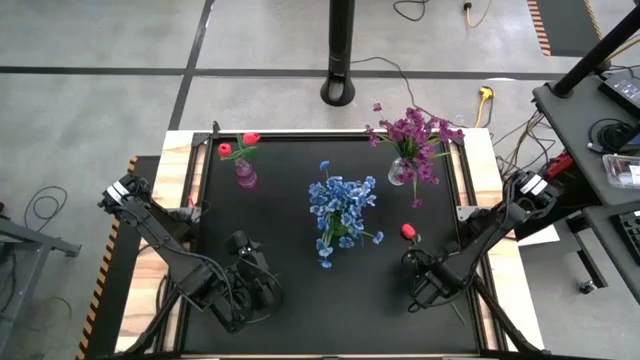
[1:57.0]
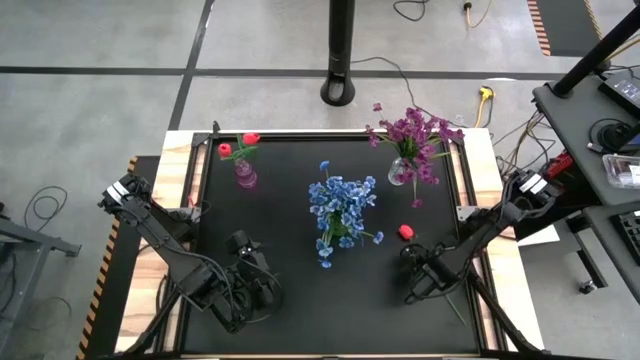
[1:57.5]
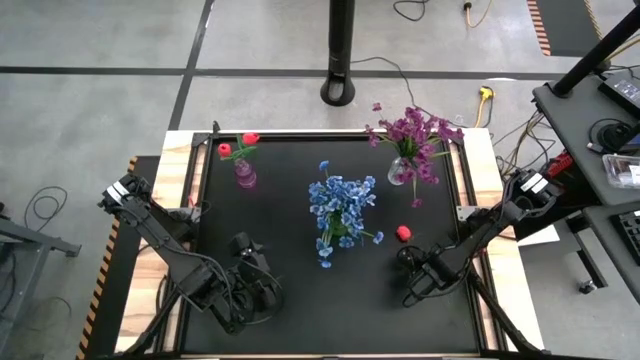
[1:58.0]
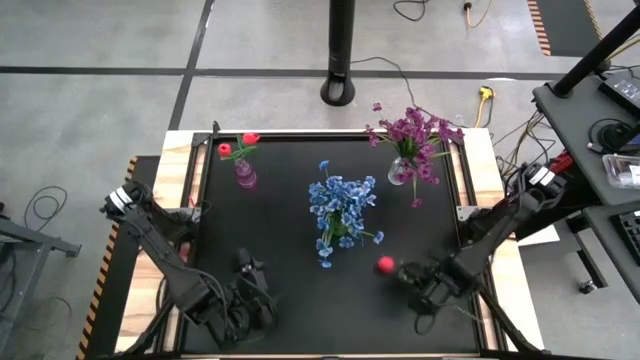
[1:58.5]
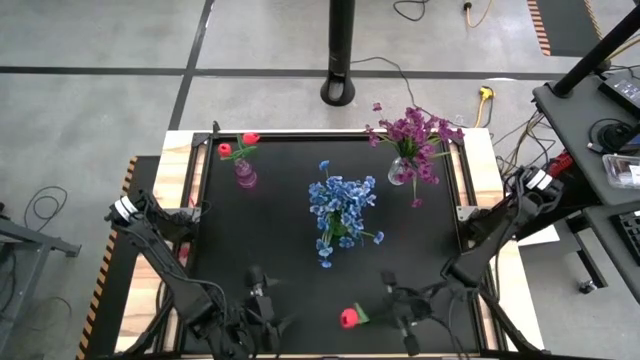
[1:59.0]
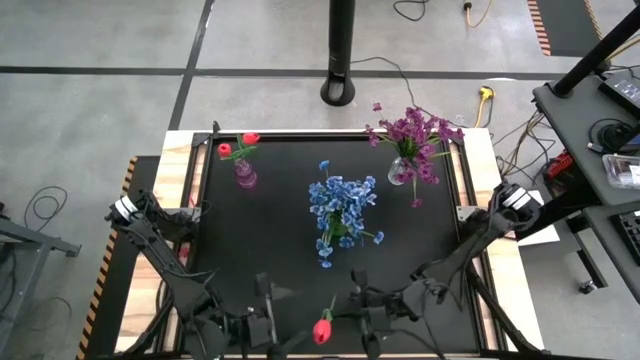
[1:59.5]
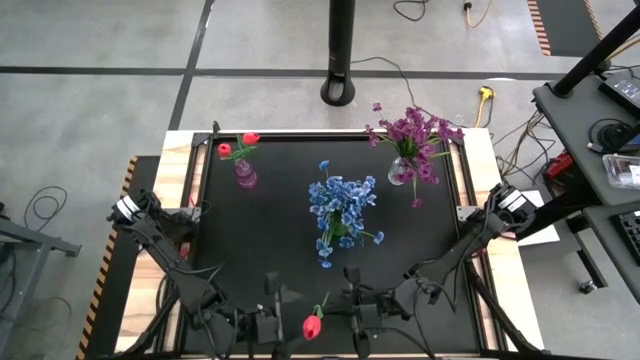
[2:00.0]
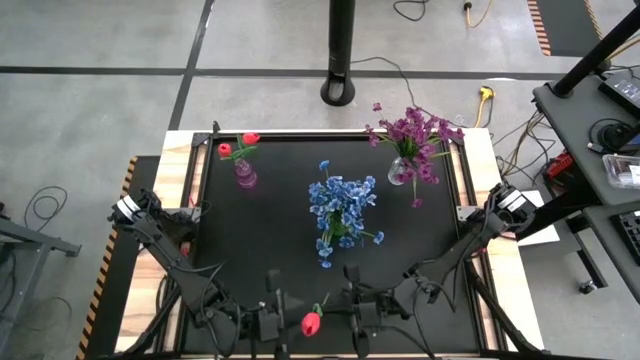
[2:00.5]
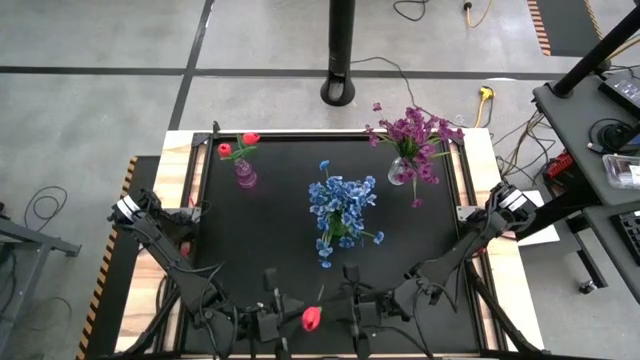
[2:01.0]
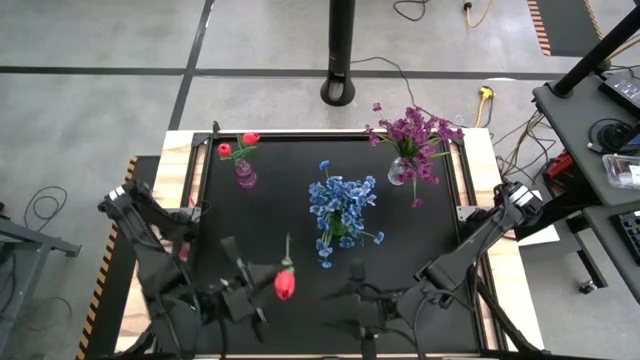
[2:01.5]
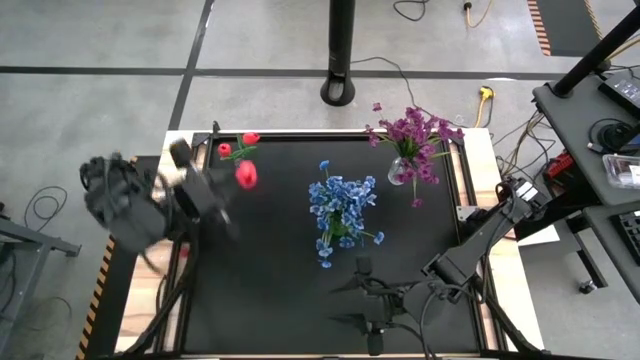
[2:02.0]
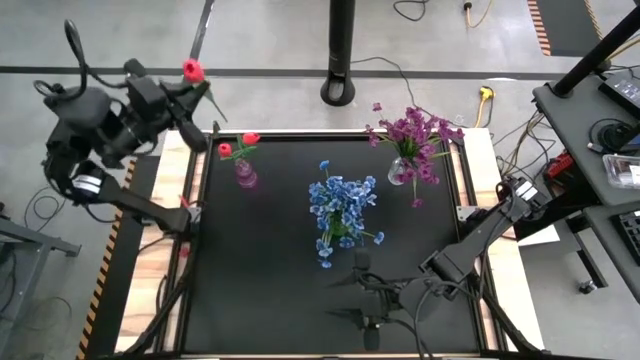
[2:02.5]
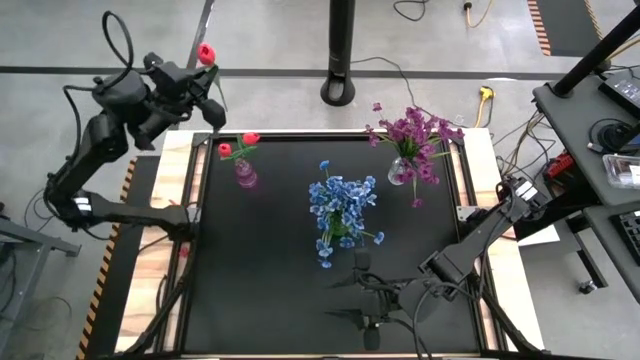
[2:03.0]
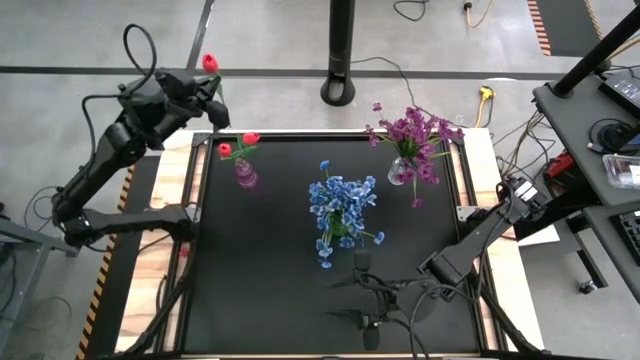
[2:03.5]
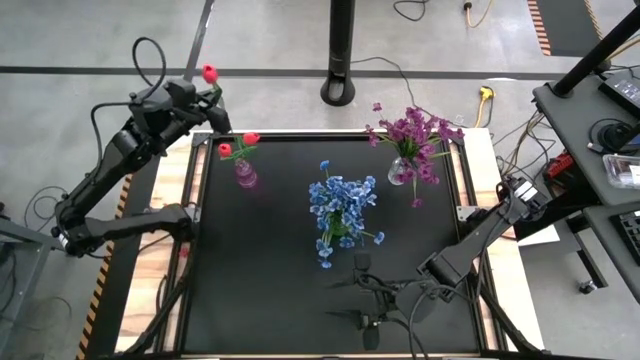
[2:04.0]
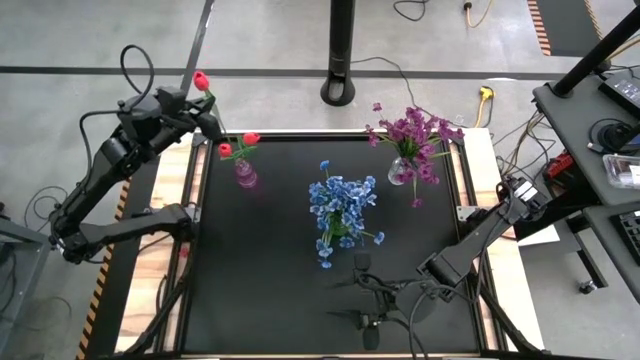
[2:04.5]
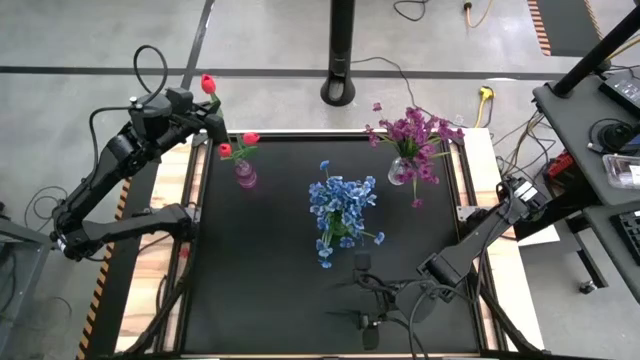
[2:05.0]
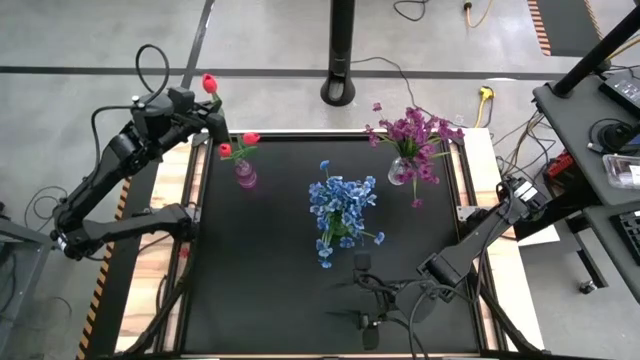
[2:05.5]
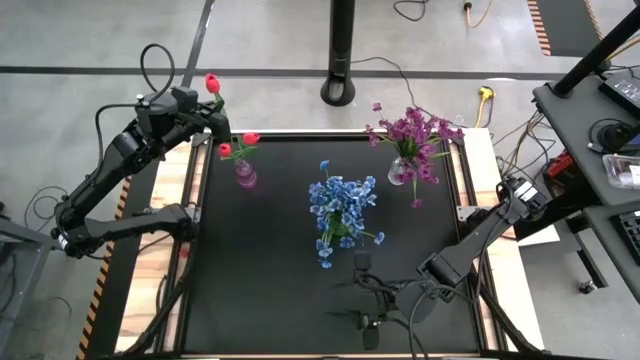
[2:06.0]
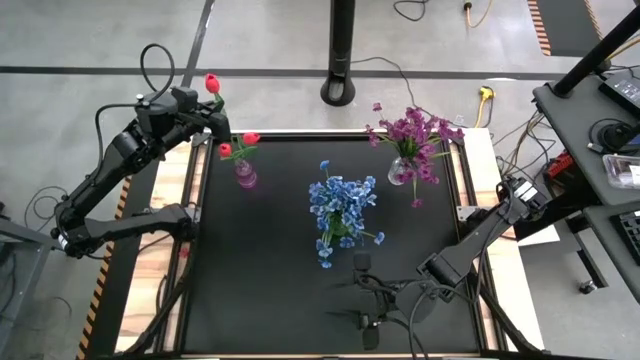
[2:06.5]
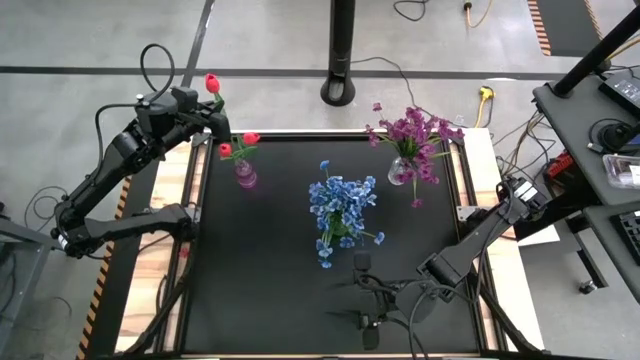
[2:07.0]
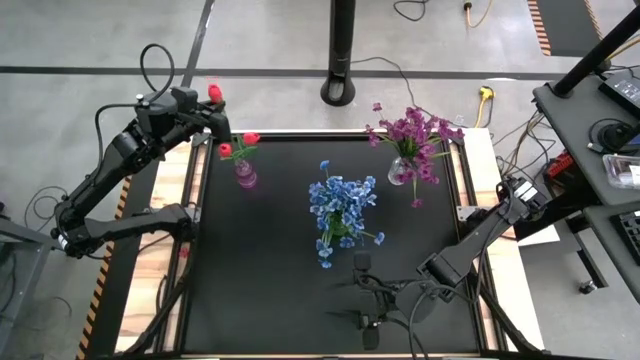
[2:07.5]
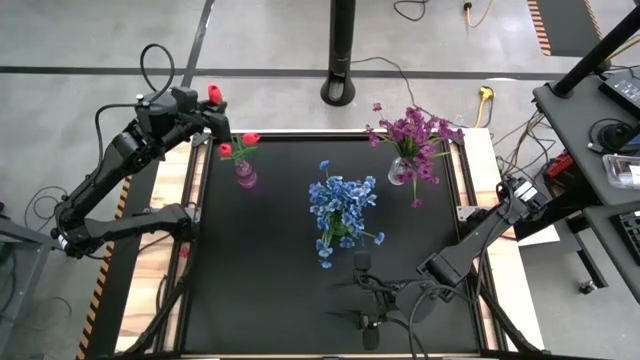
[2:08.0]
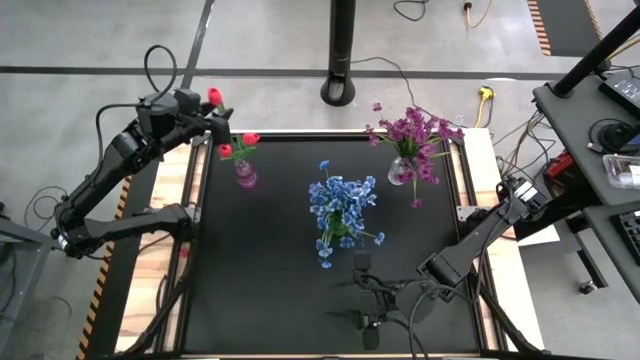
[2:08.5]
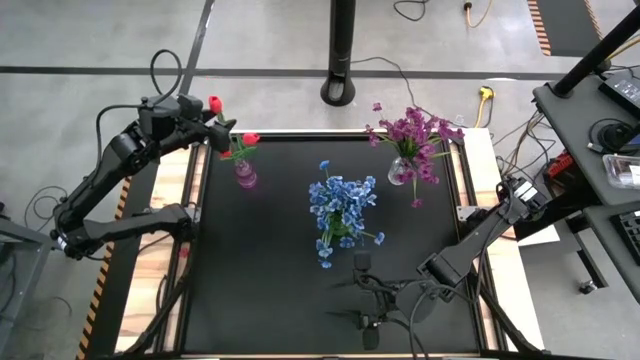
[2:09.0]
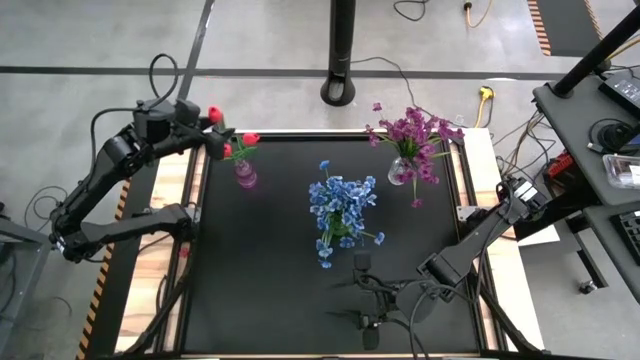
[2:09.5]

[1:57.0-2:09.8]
Task: Sort flowers into vase by color
Put the pink tulip into the violet vase

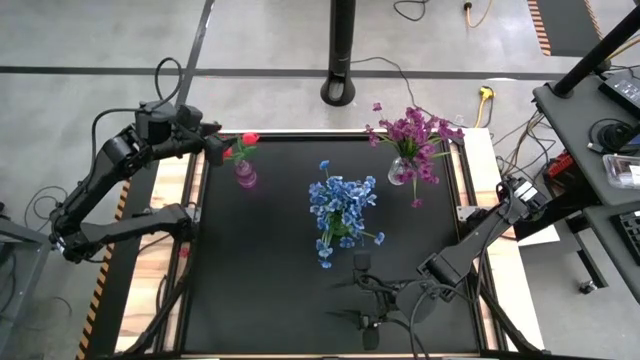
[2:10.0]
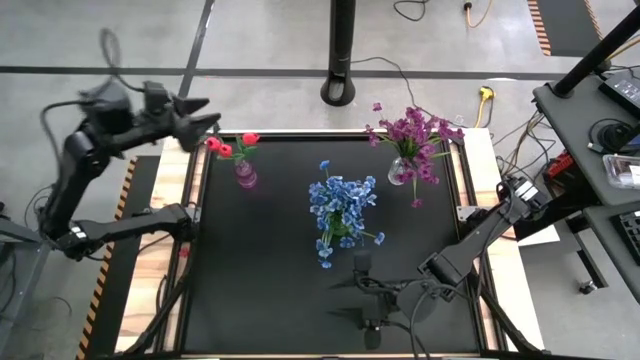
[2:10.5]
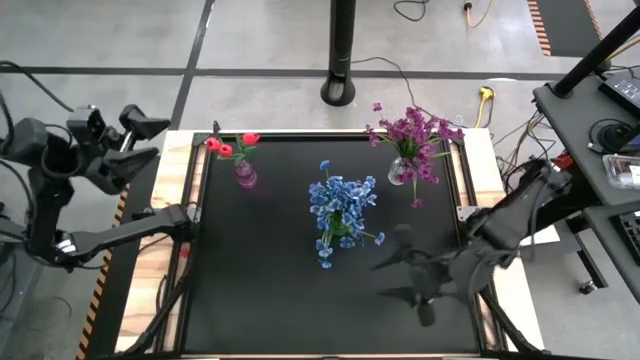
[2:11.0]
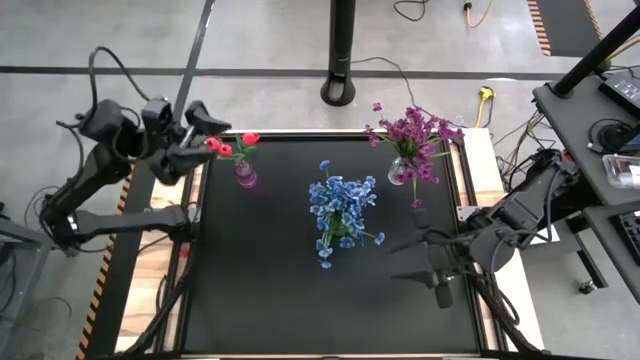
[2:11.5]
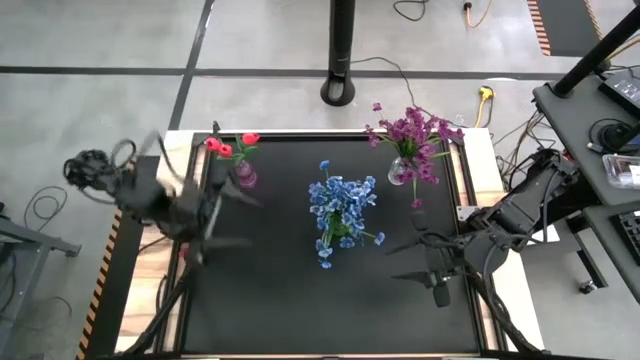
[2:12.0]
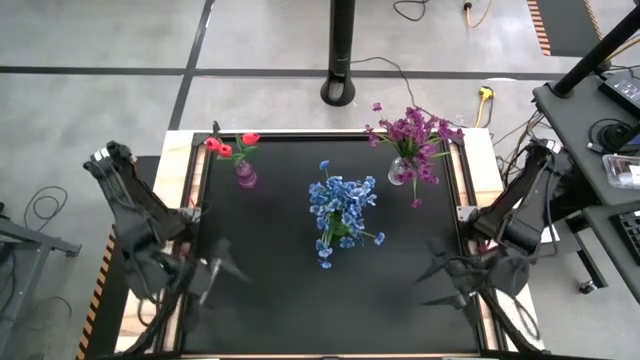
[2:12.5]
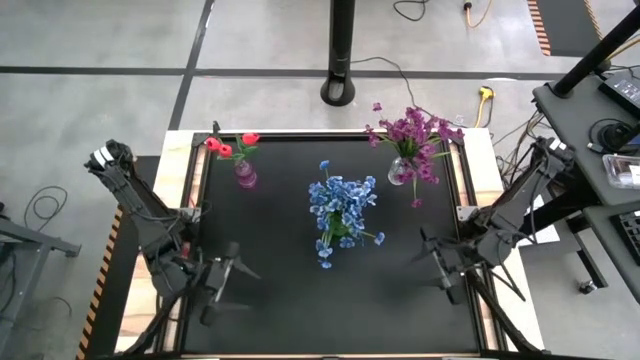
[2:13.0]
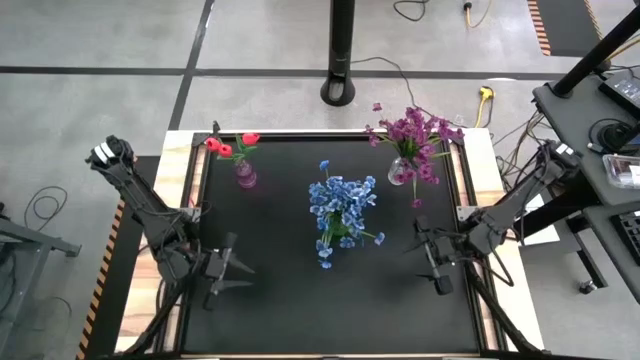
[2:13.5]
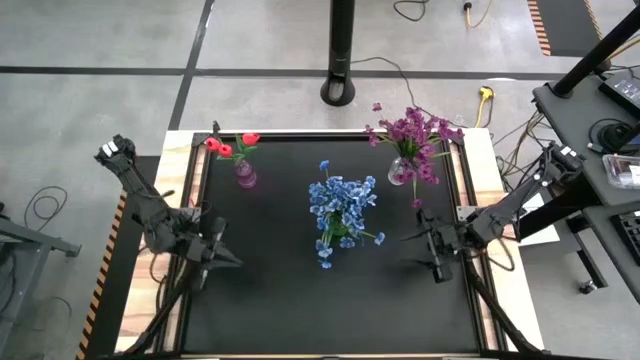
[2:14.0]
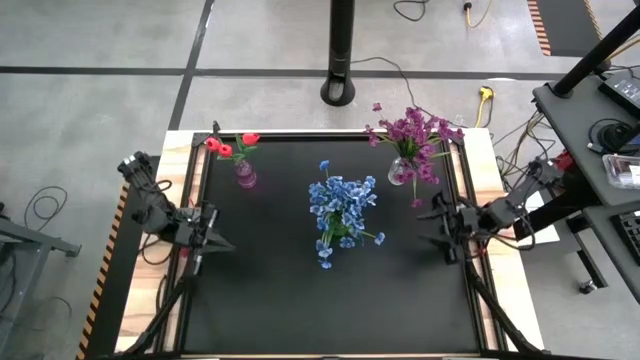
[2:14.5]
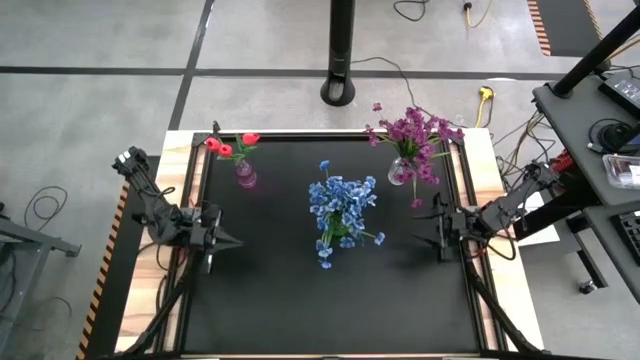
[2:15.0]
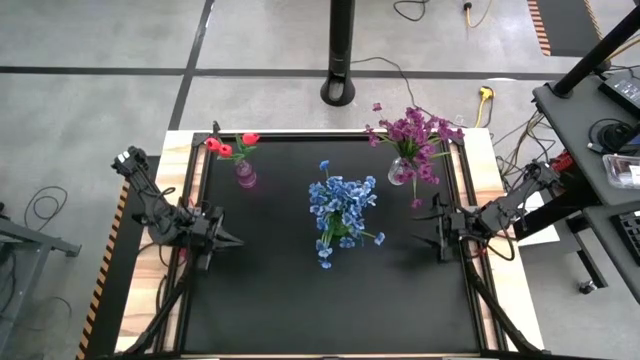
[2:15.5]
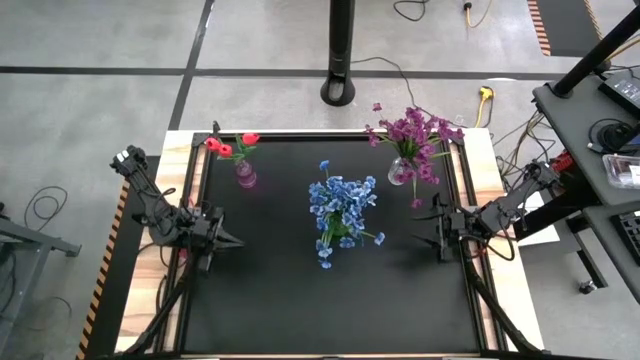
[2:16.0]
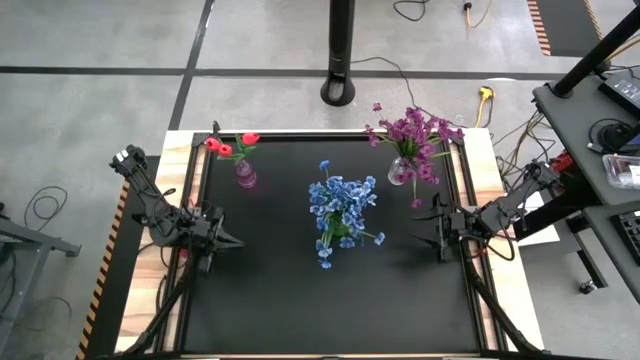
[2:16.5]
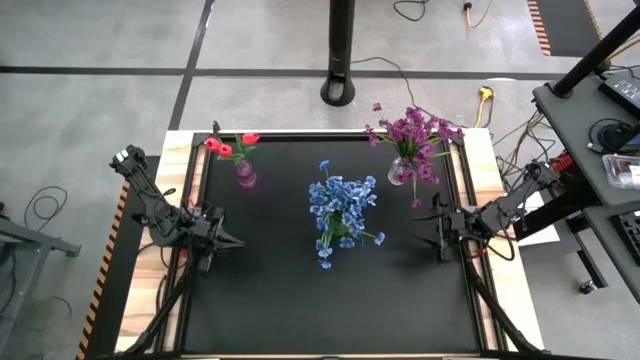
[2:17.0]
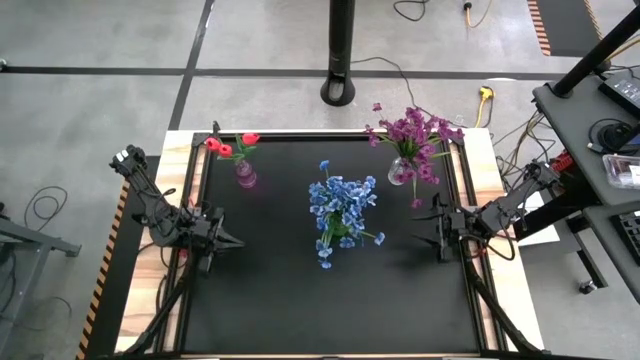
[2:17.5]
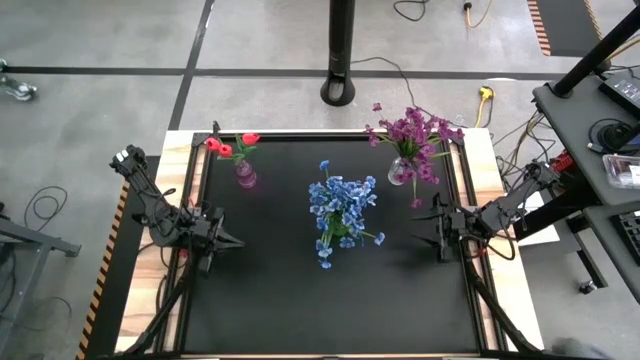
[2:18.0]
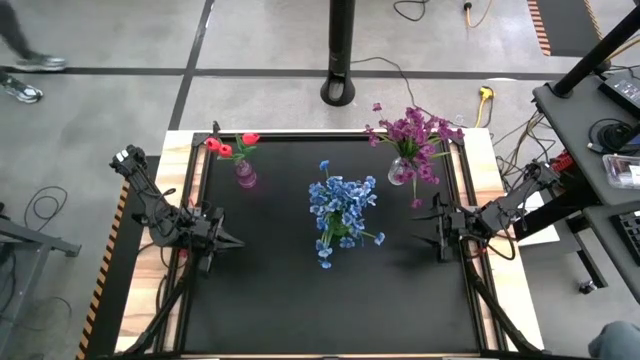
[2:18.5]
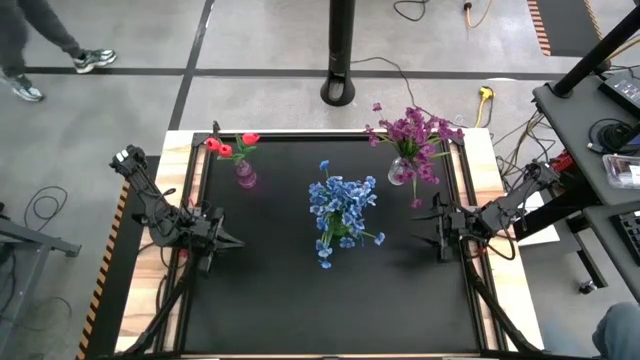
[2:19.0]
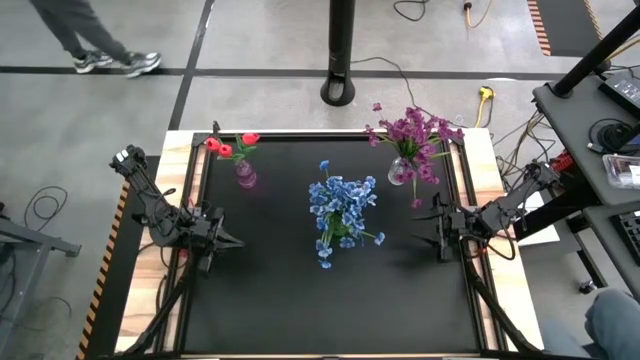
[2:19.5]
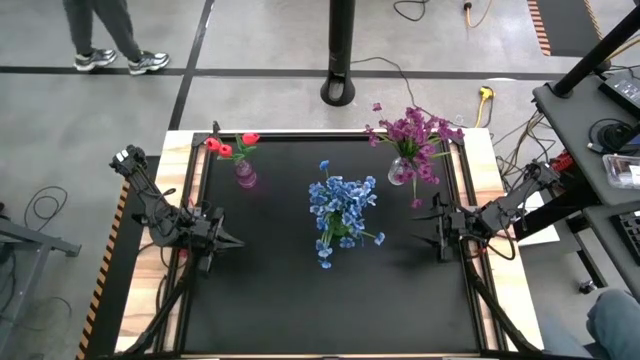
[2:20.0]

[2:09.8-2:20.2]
Return to Home Position
